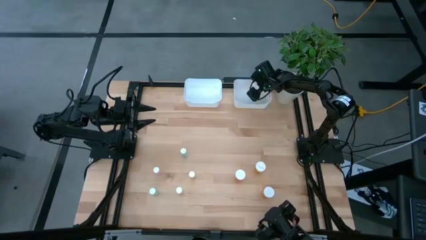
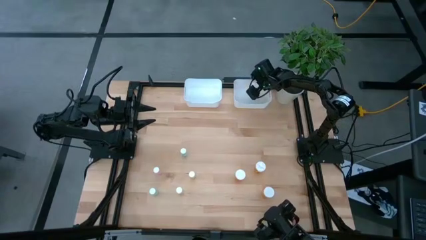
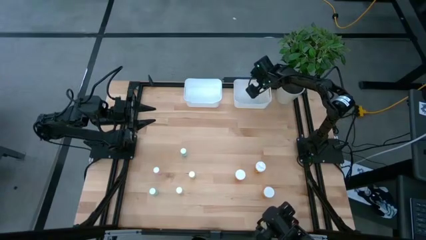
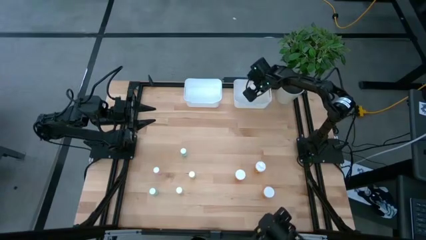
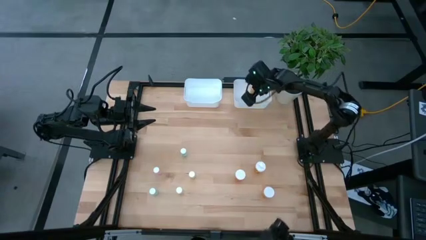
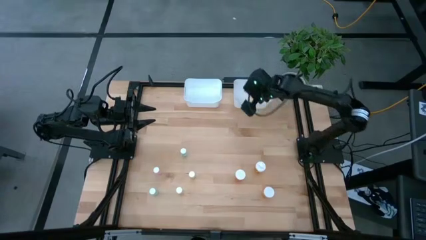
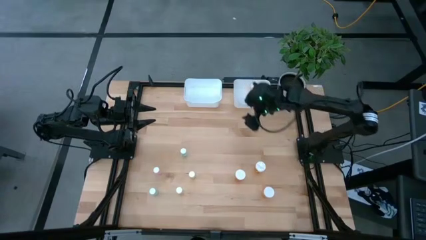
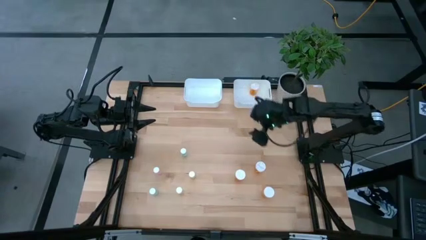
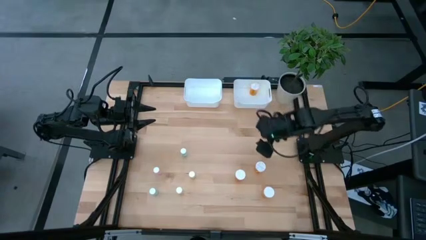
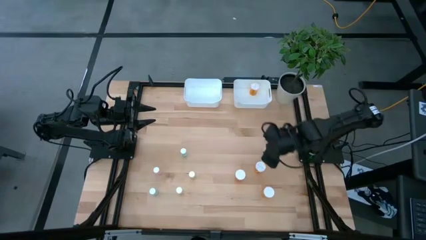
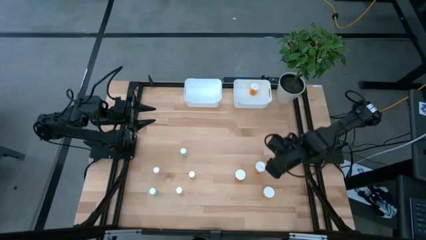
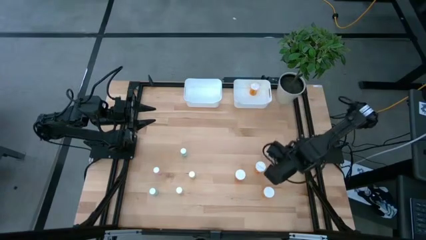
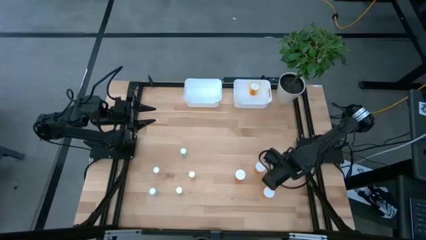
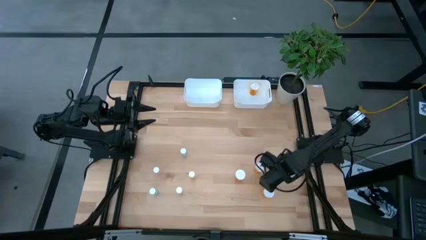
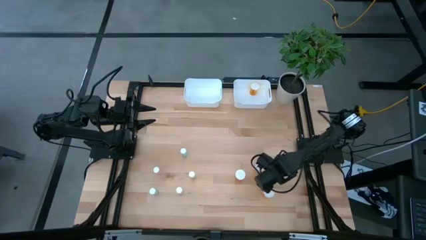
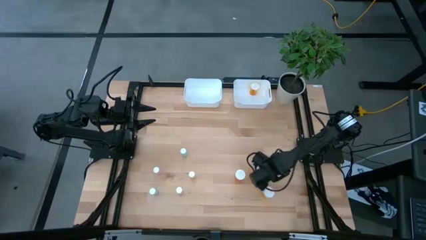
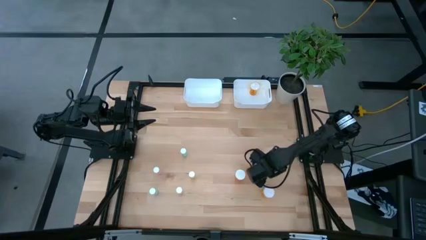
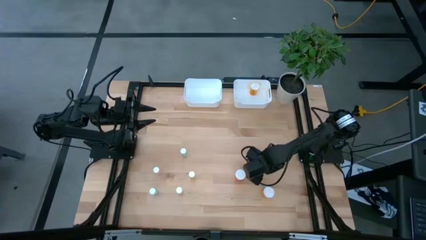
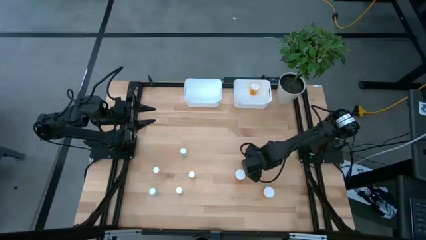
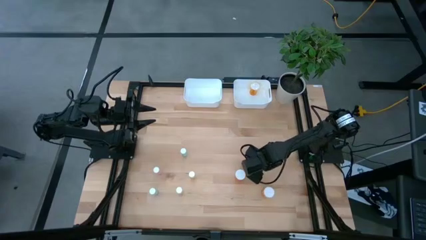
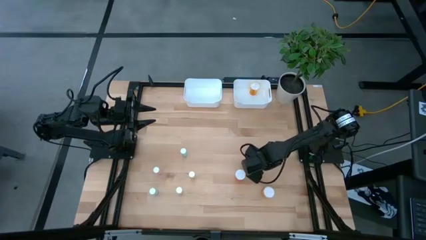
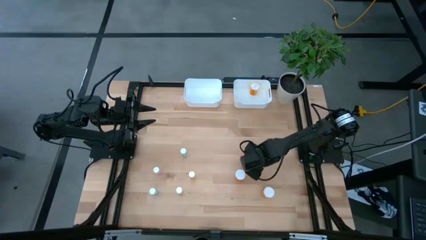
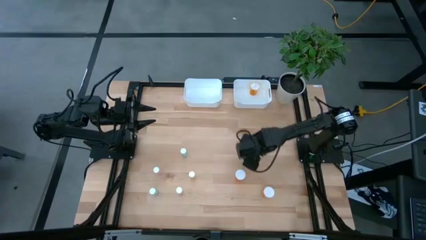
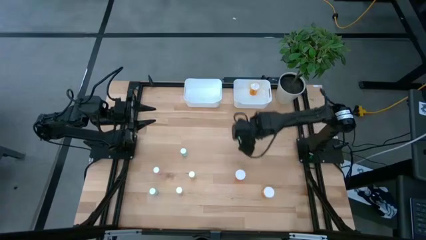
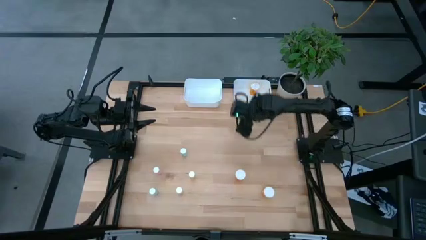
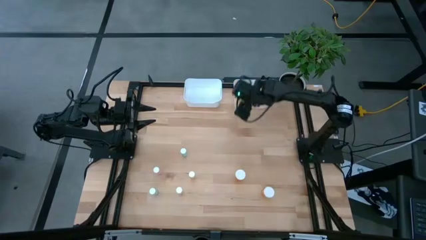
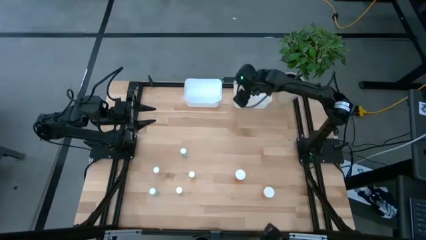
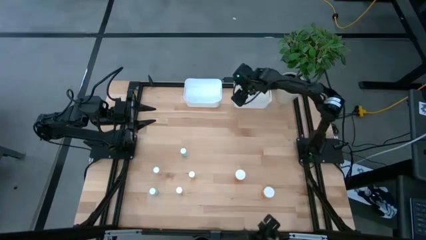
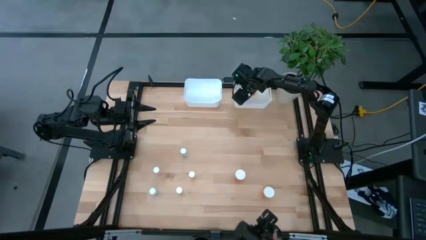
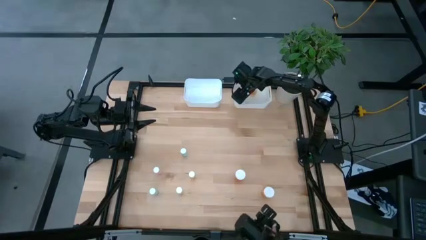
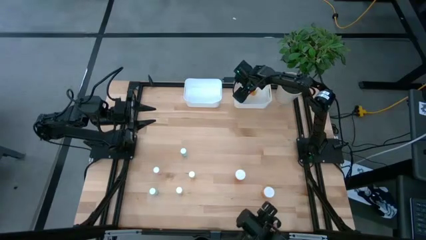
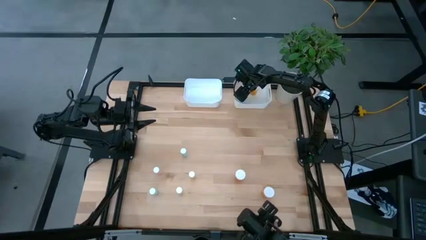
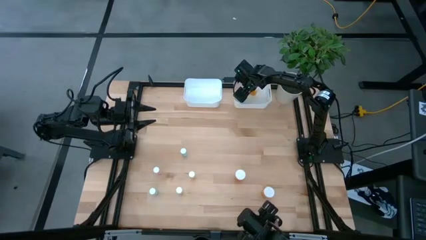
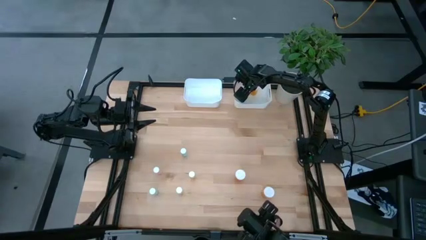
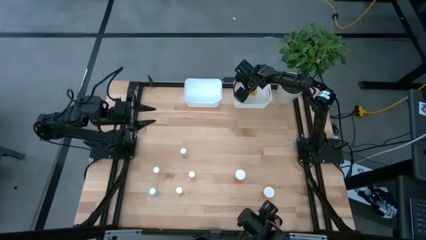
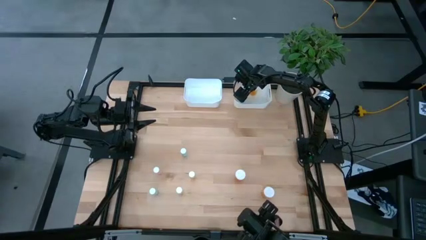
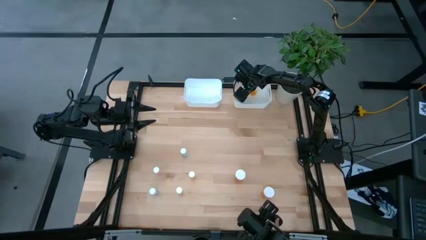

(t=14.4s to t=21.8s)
Task: Pick and place medicine bottles into bin by pill shape (circle, oval)
Put the orange capsule bottle into the right white bin

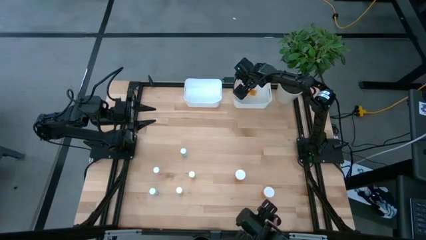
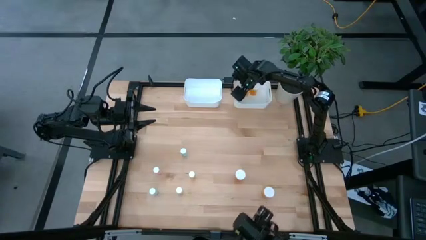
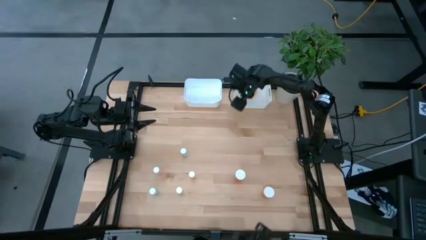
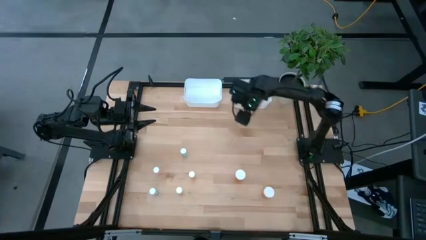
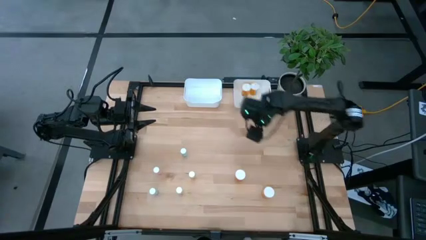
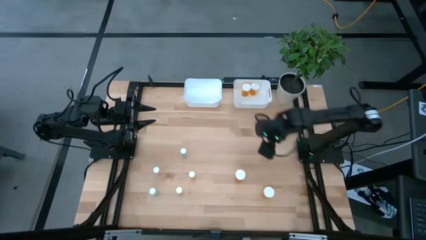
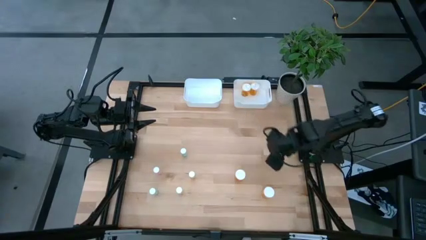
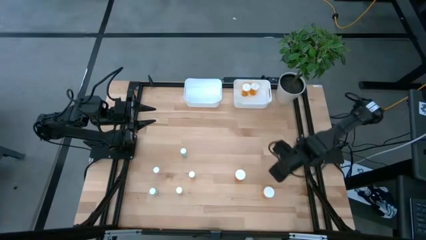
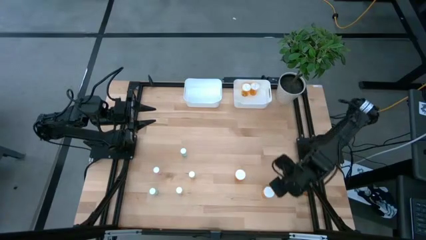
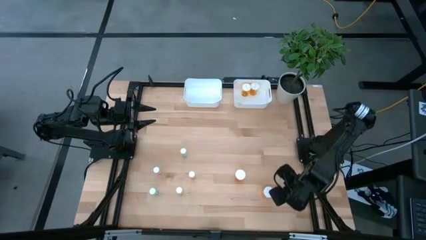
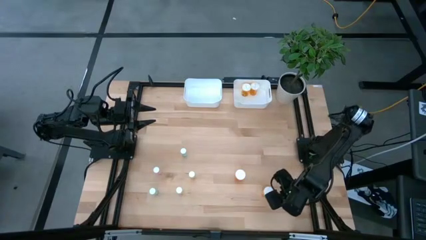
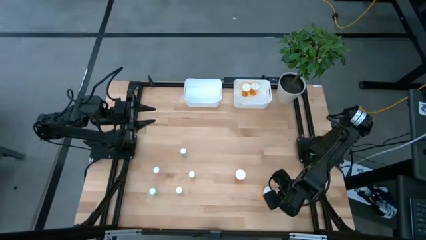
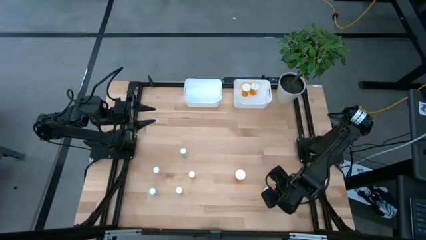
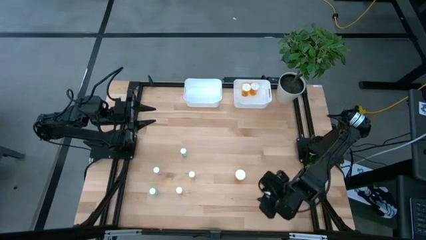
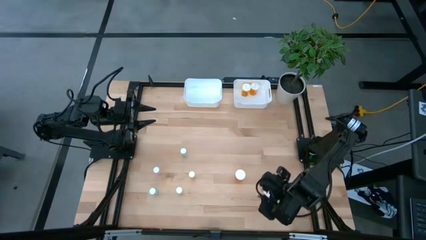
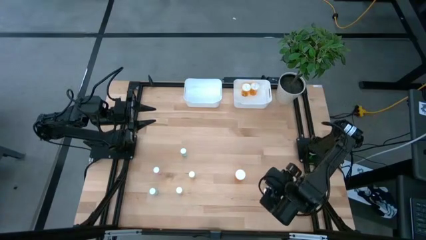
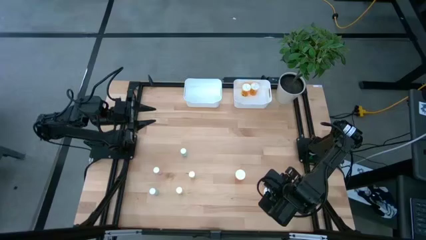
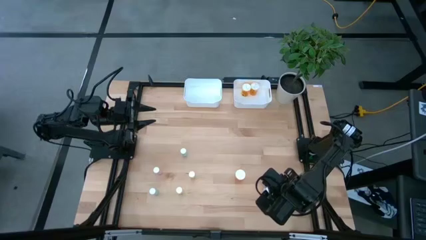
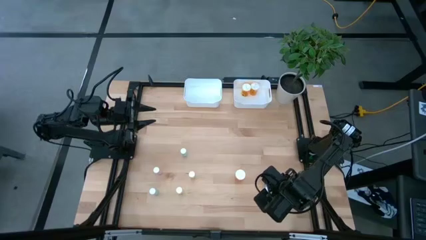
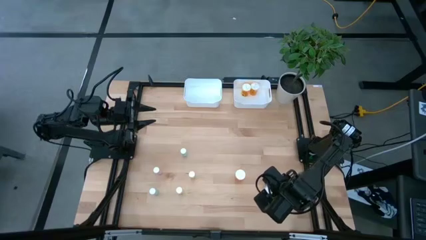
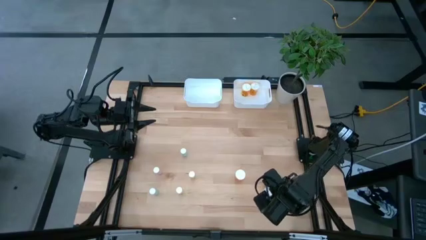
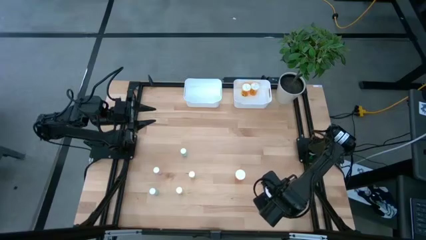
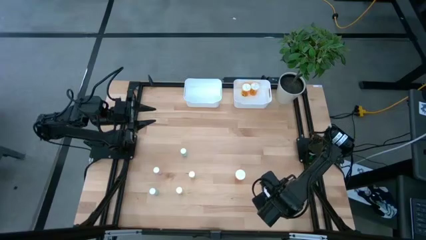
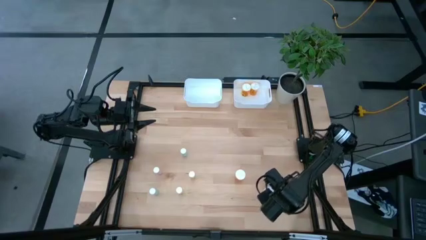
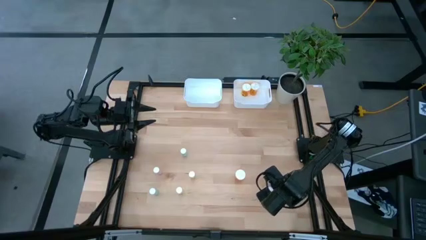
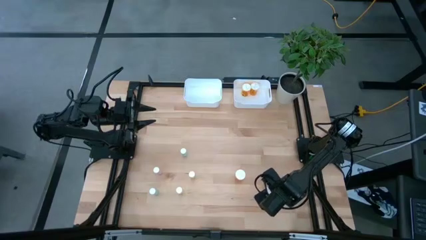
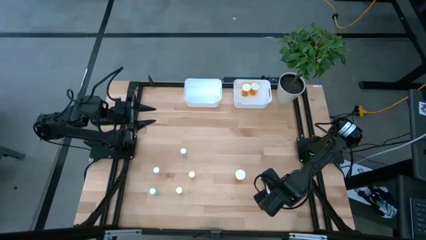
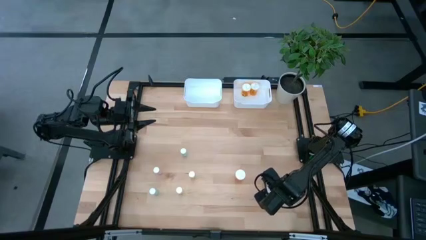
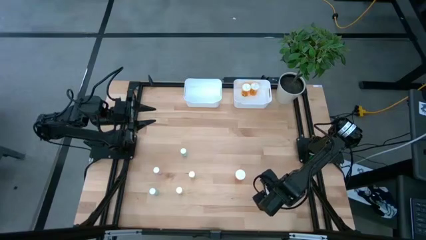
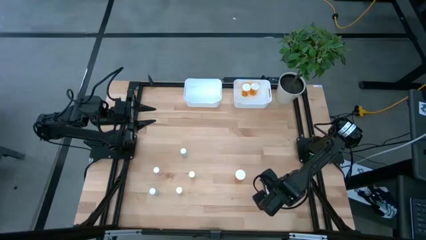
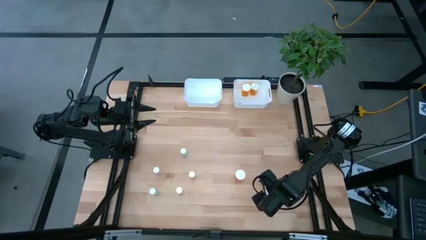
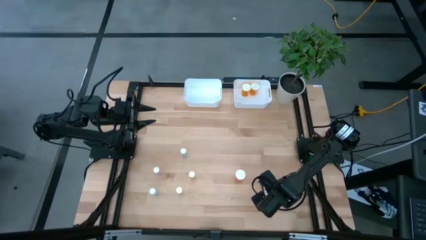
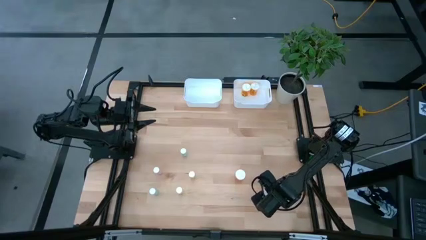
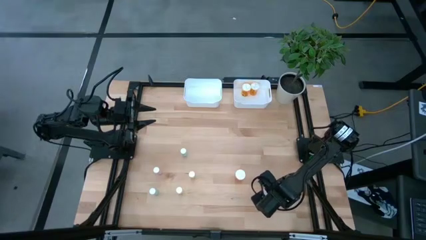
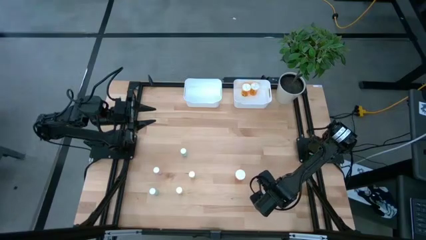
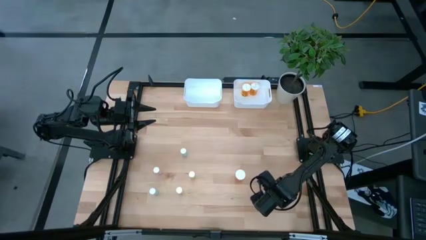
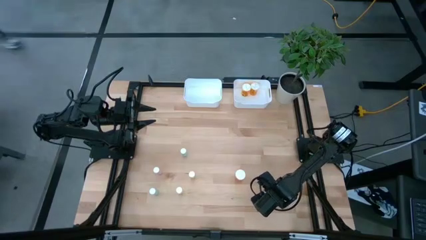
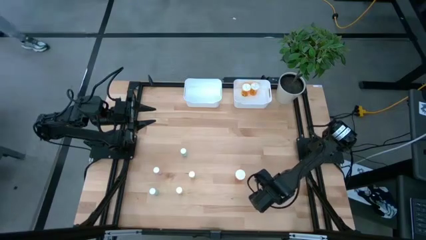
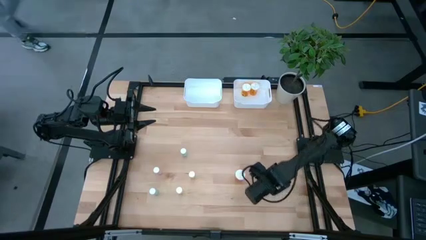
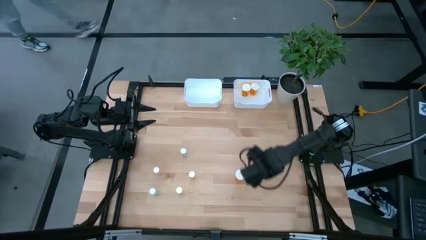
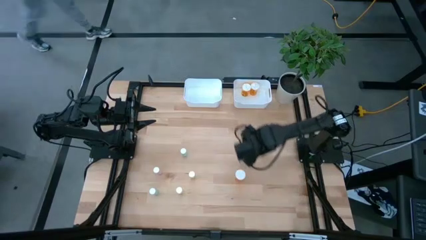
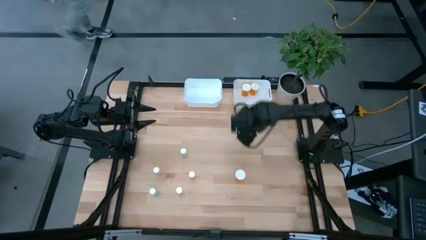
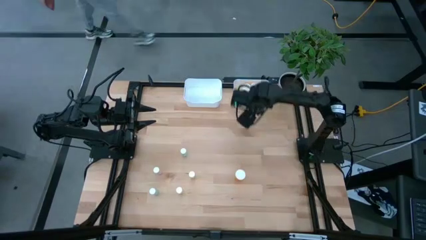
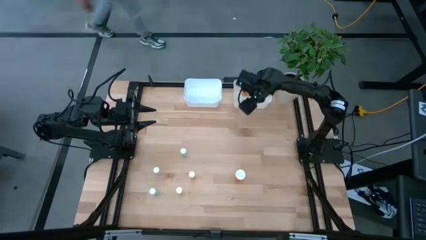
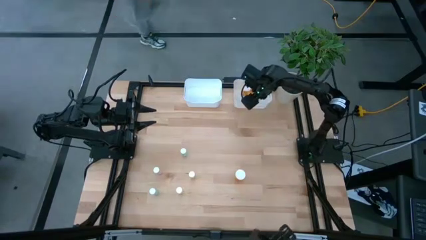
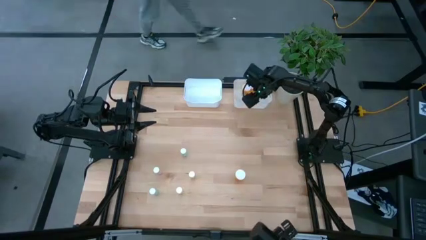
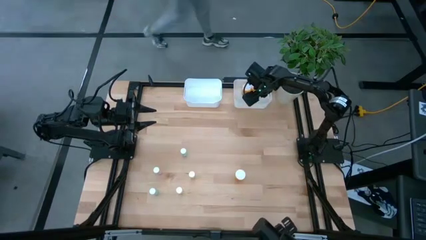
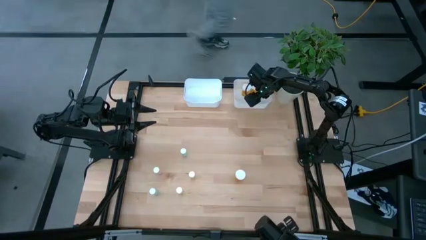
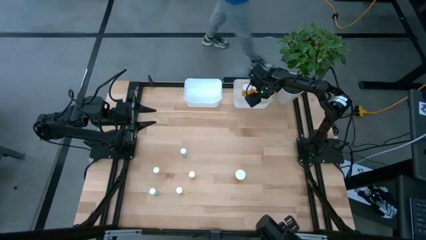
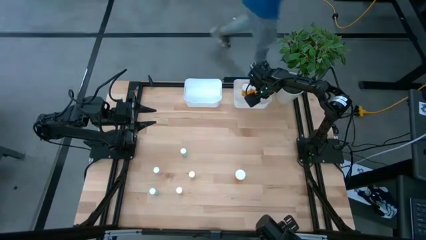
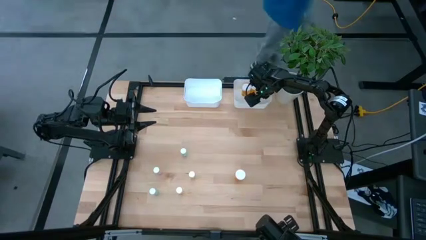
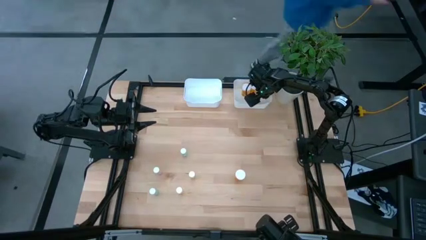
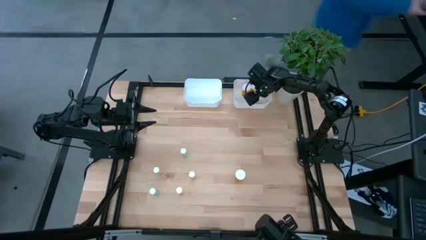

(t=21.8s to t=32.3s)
Put the orange capsule bottle into the right white bin
